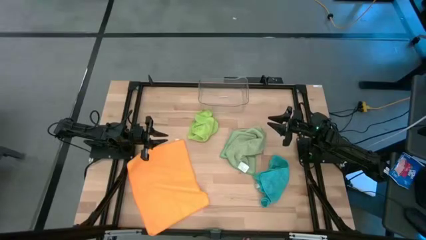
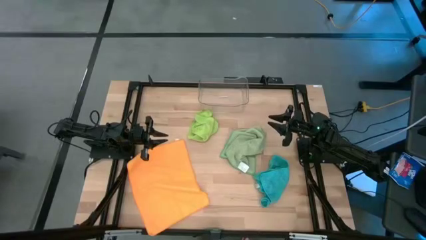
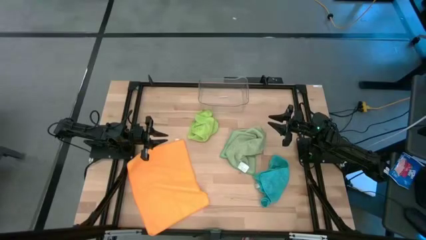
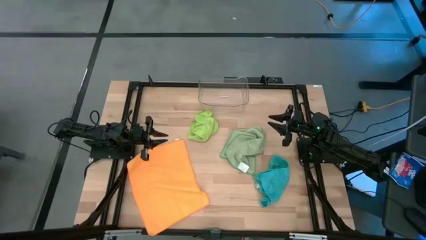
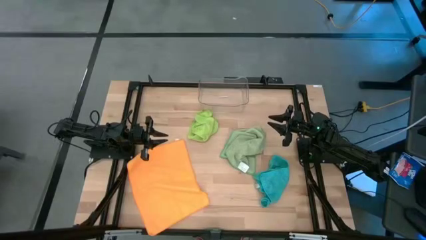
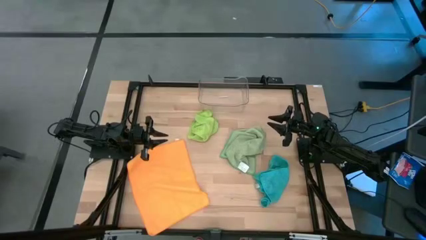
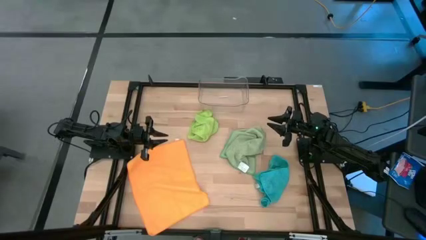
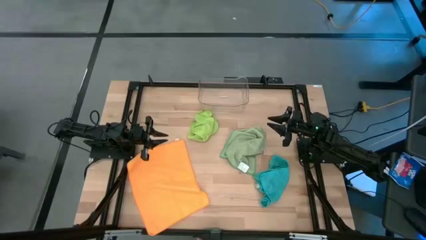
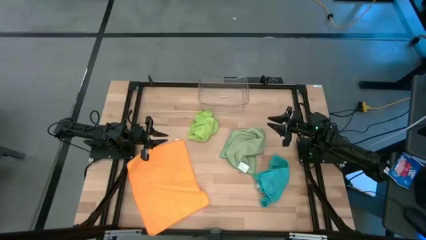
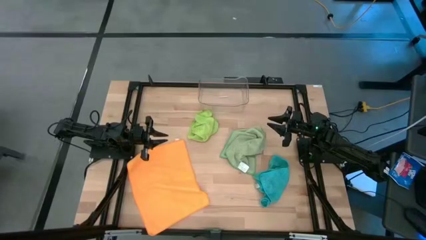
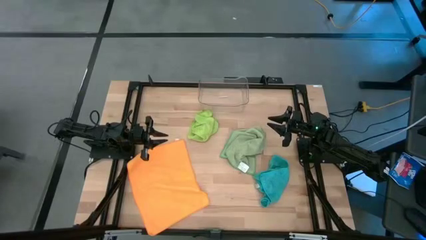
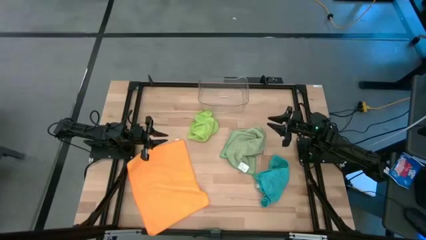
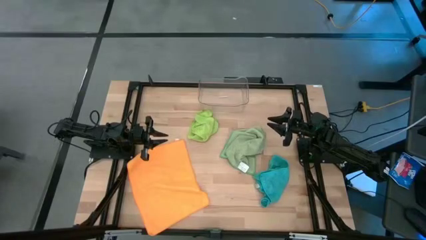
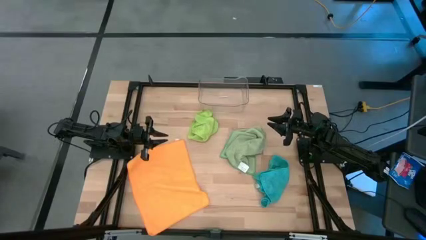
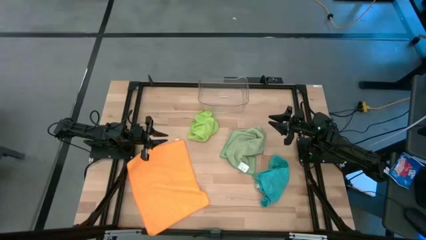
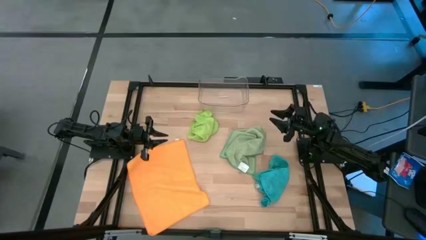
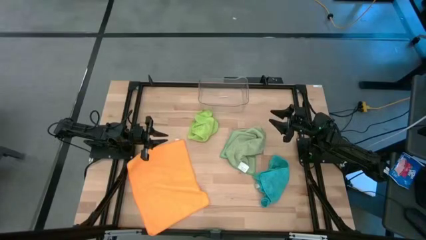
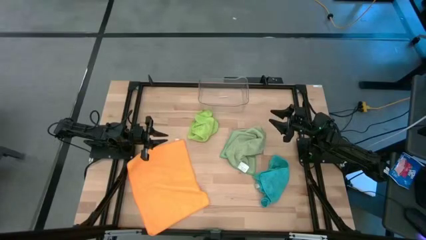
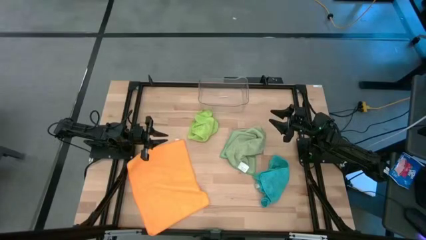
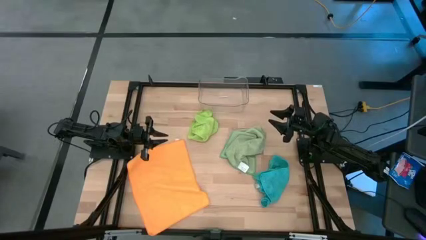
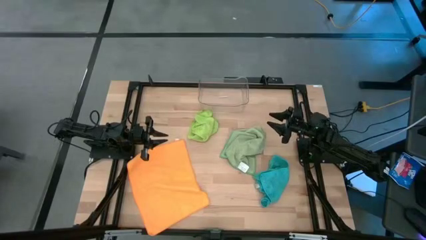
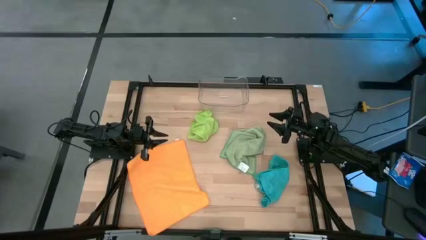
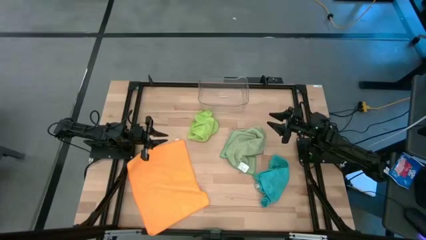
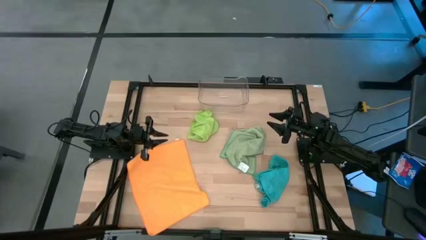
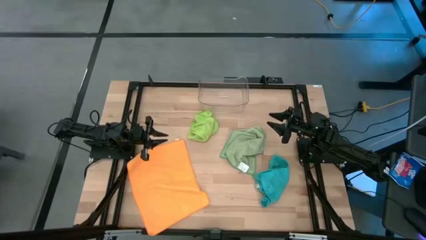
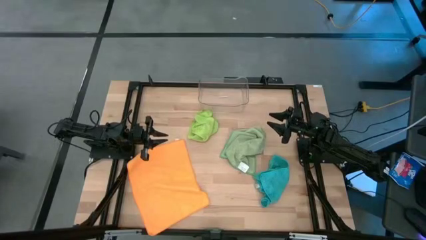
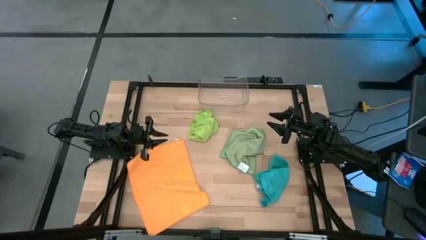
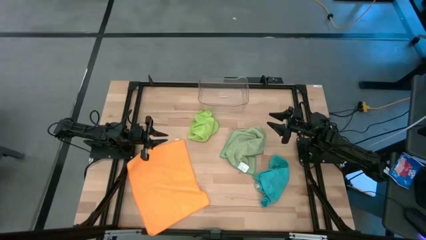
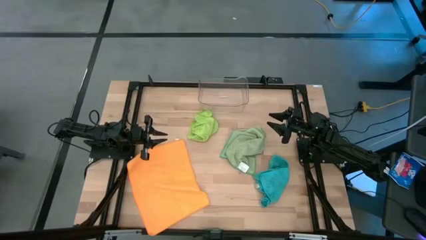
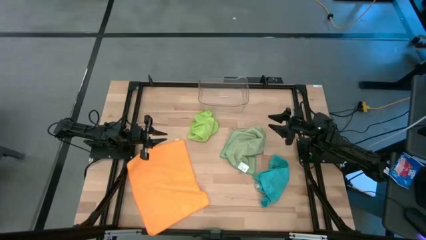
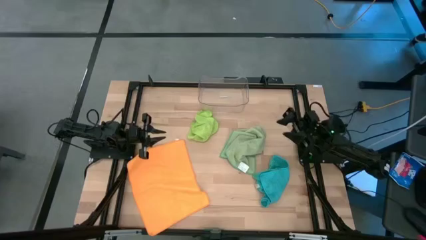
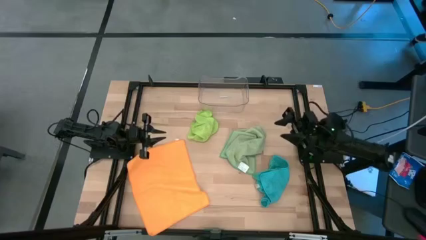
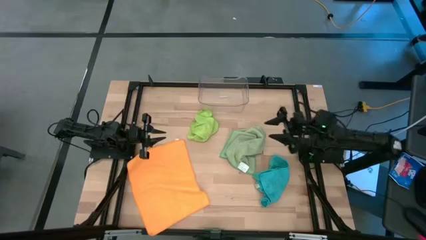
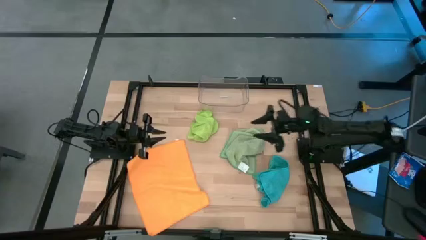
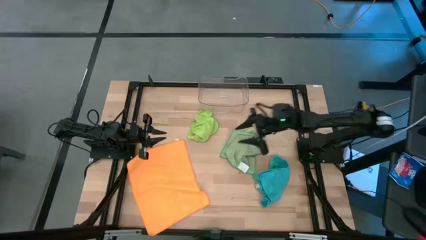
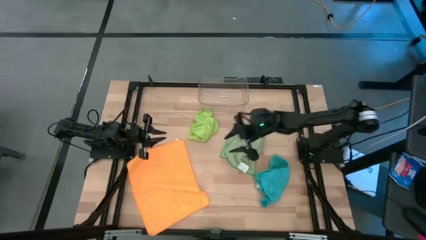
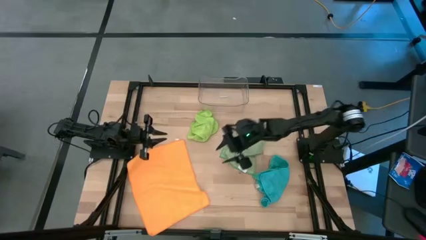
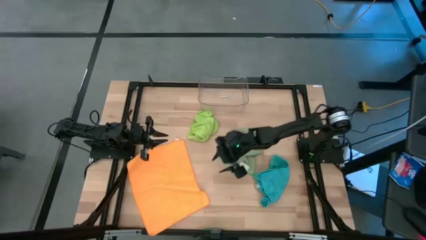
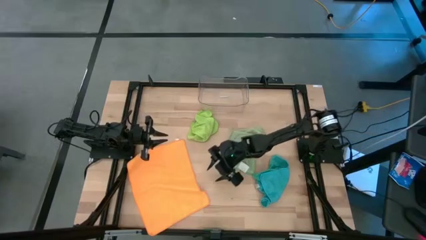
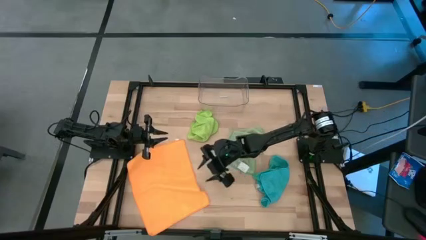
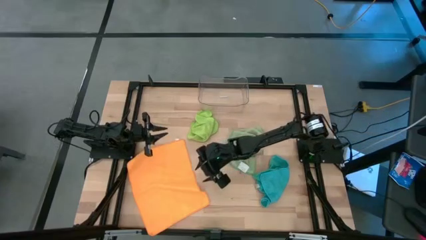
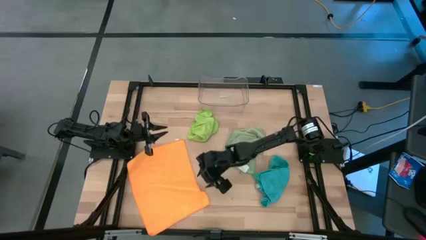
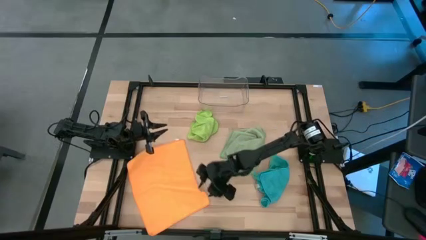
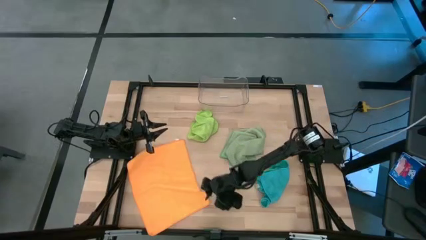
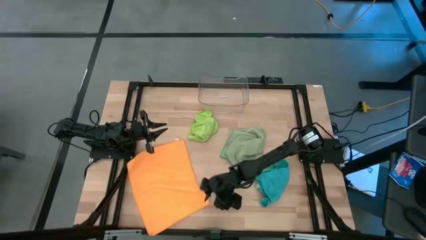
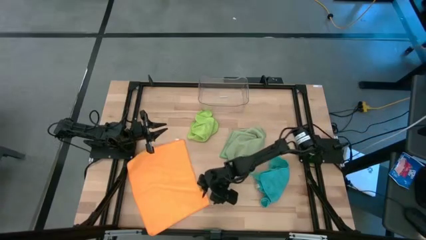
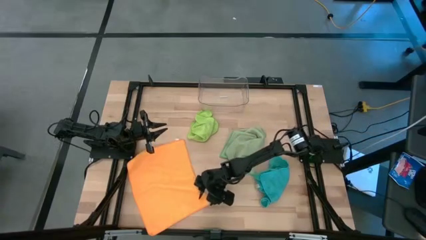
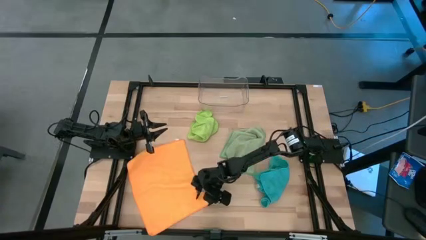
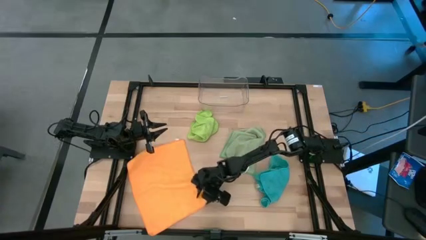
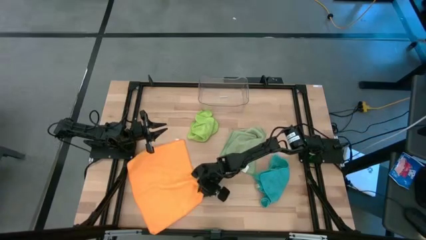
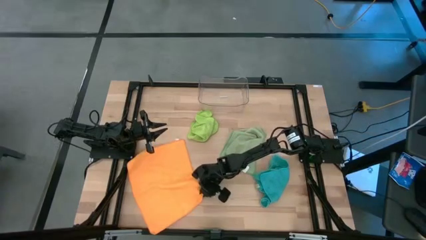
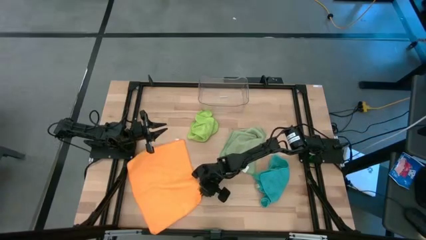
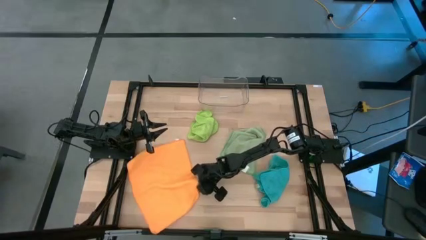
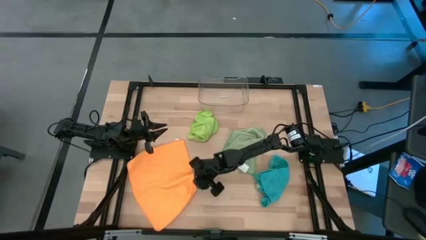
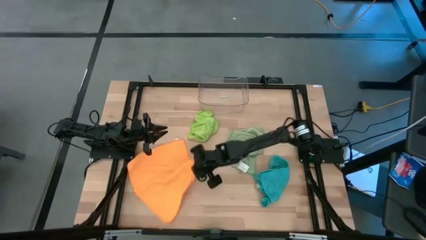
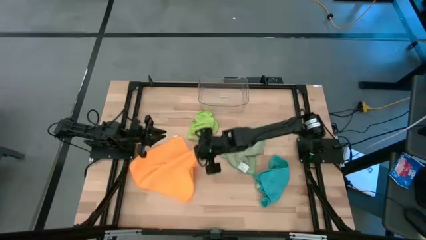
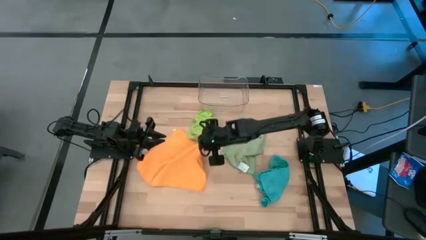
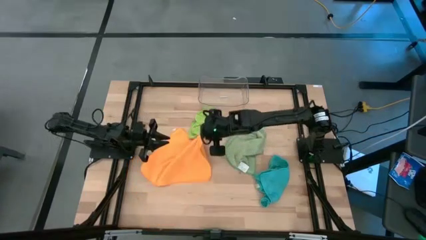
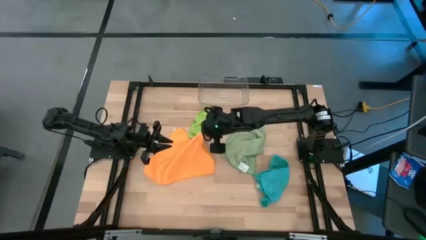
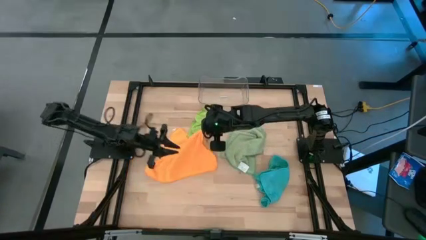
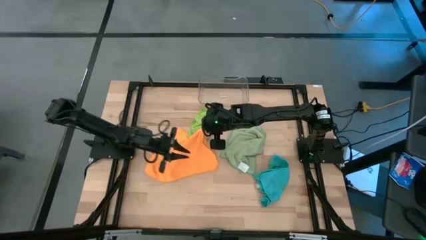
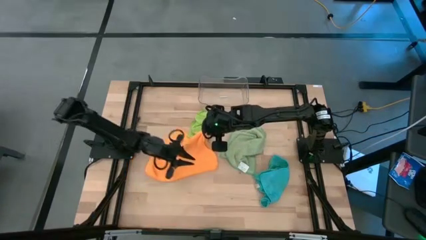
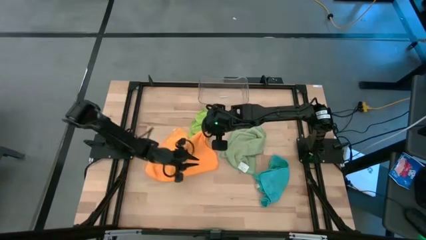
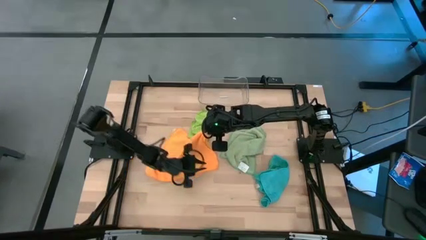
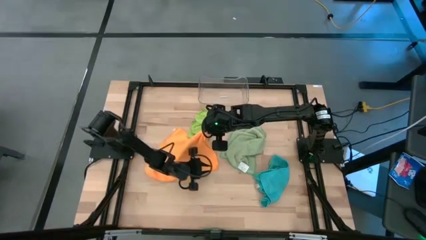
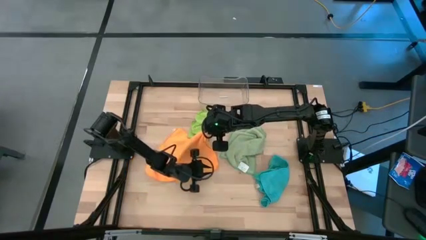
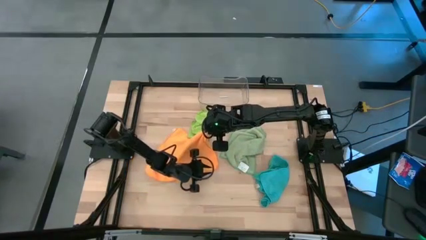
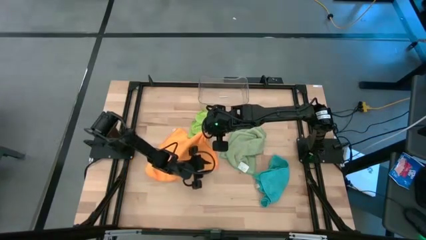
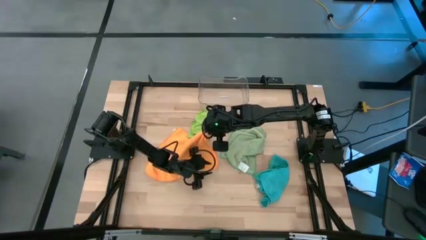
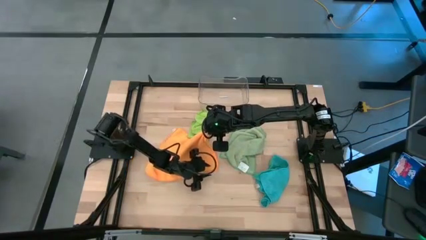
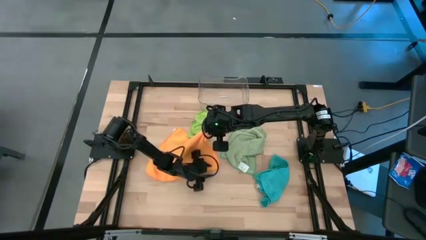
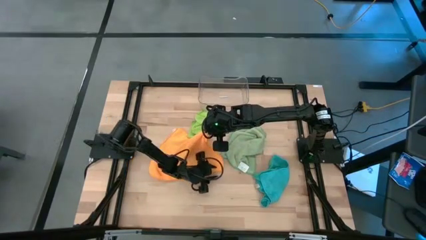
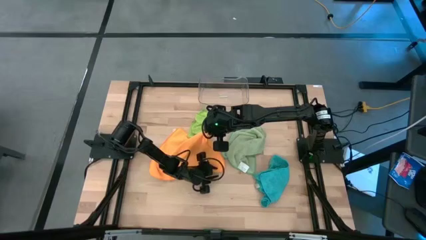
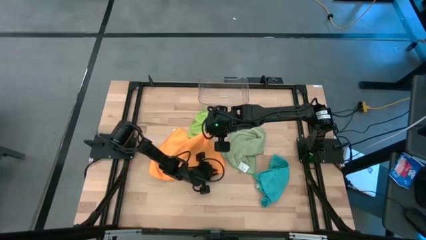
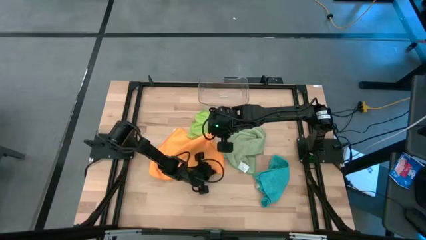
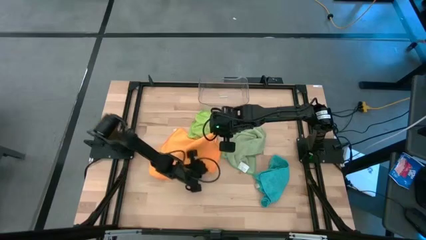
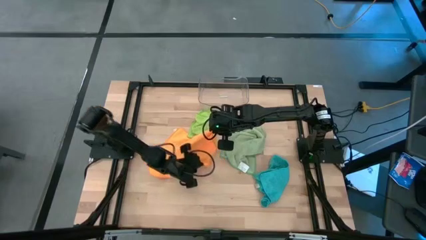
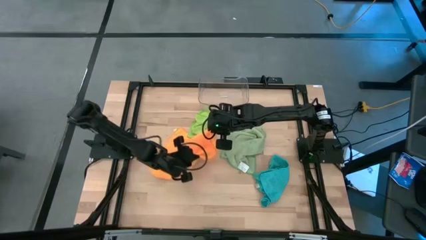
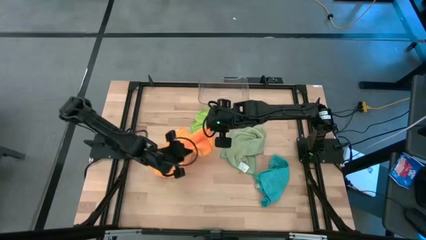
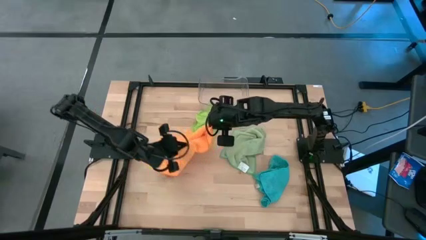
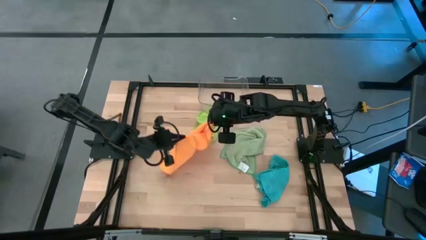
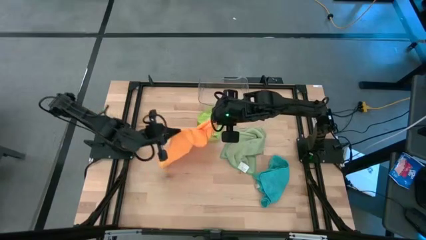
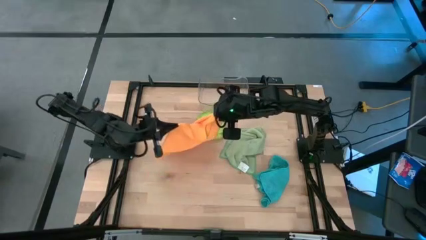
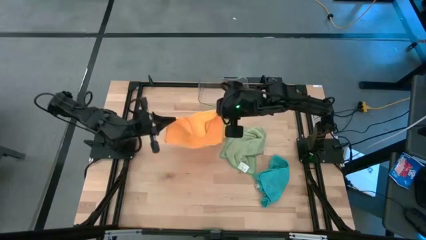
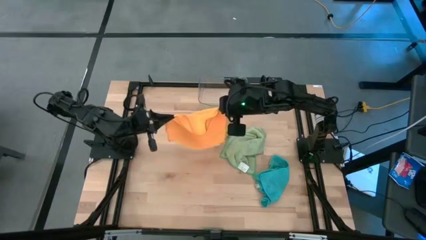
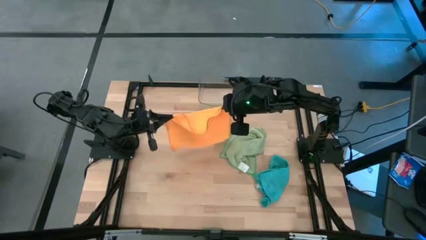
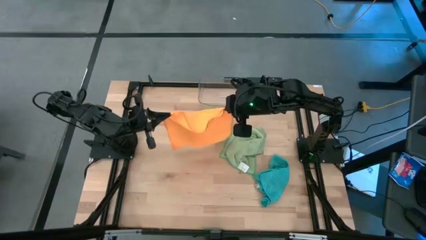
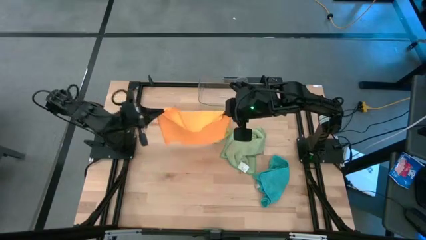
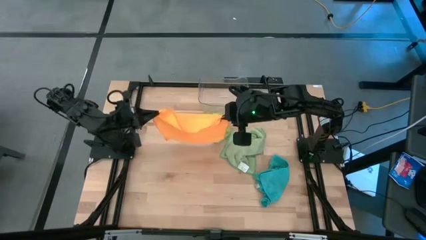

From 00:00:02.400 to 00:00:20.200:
Task: Fold microfiber towels
Fold the orange microfiber towel
